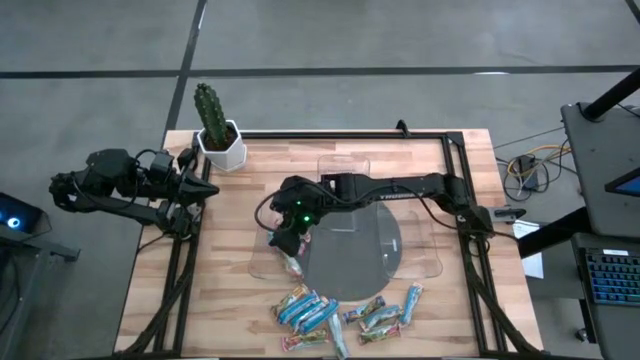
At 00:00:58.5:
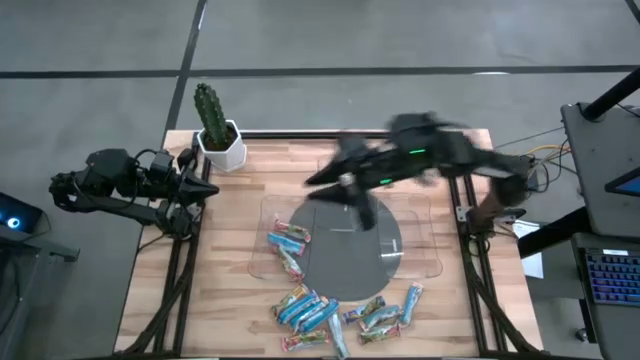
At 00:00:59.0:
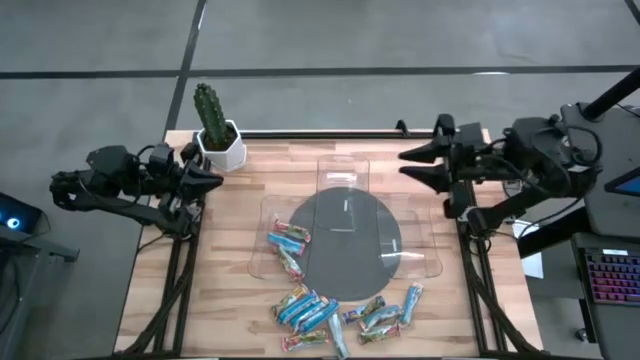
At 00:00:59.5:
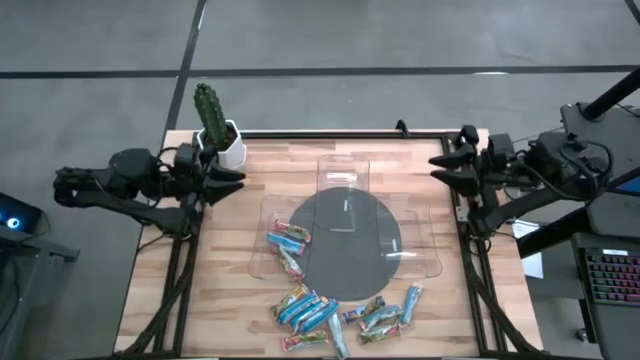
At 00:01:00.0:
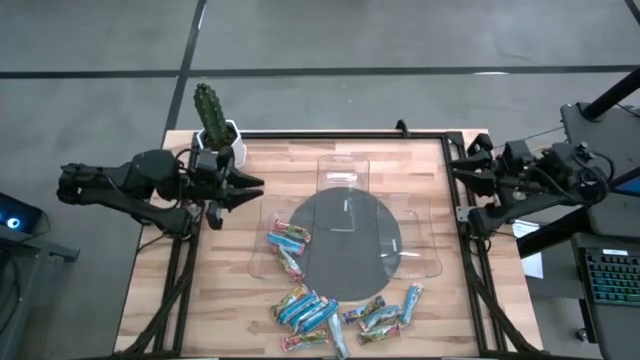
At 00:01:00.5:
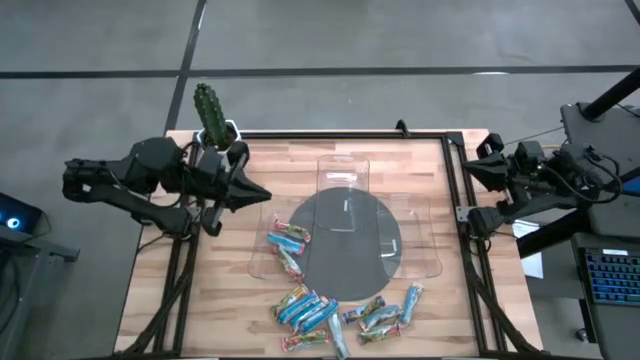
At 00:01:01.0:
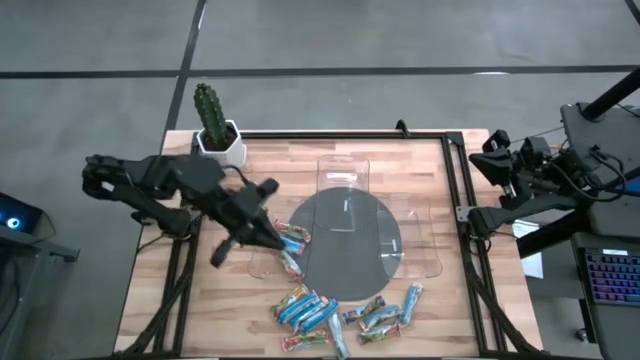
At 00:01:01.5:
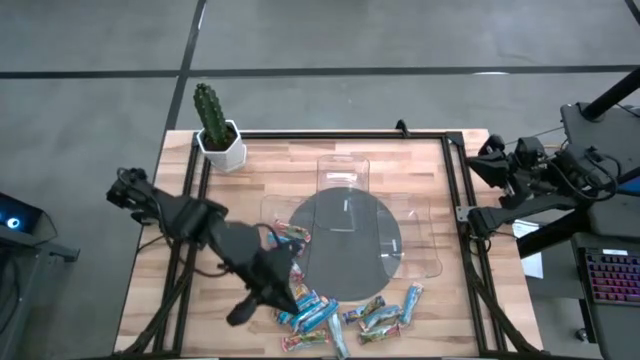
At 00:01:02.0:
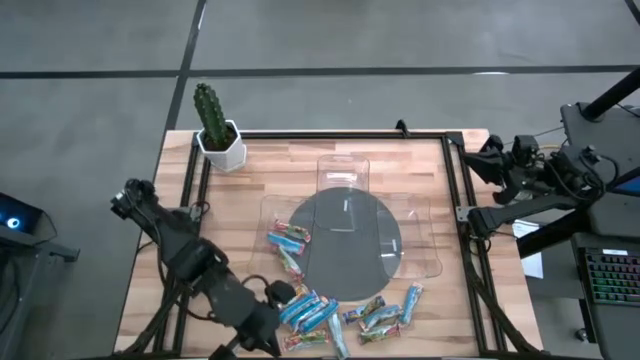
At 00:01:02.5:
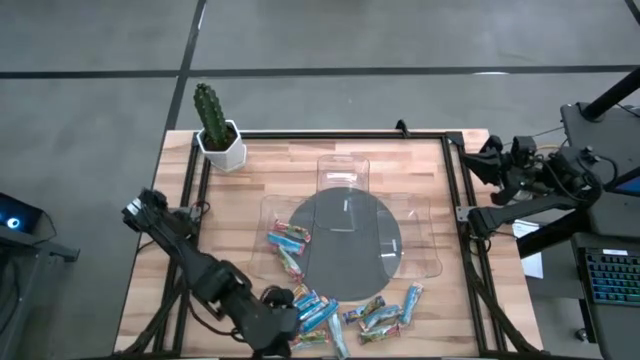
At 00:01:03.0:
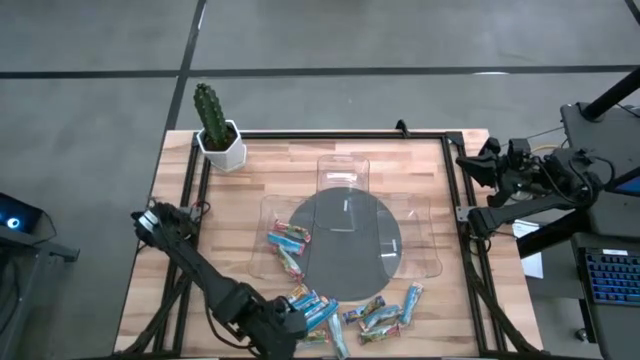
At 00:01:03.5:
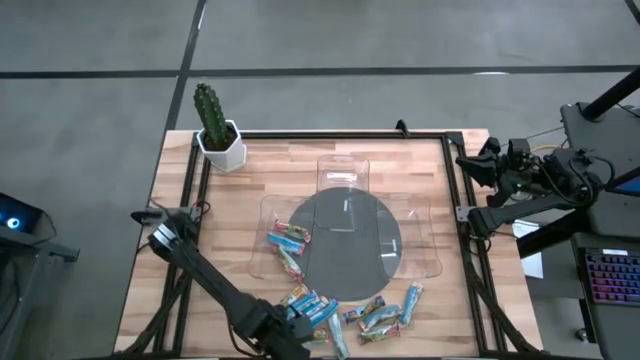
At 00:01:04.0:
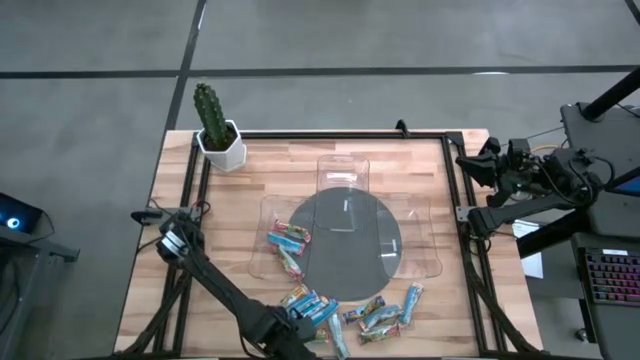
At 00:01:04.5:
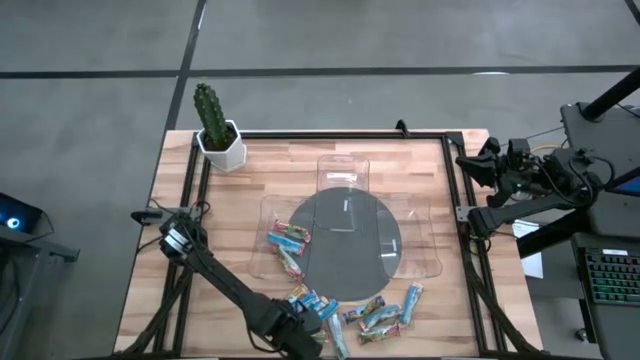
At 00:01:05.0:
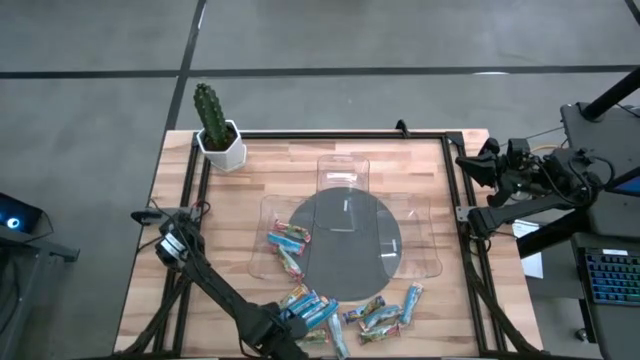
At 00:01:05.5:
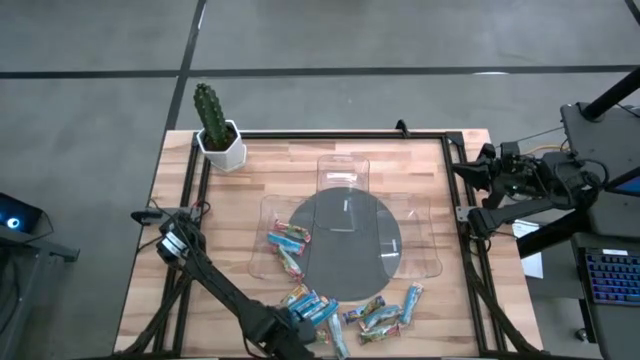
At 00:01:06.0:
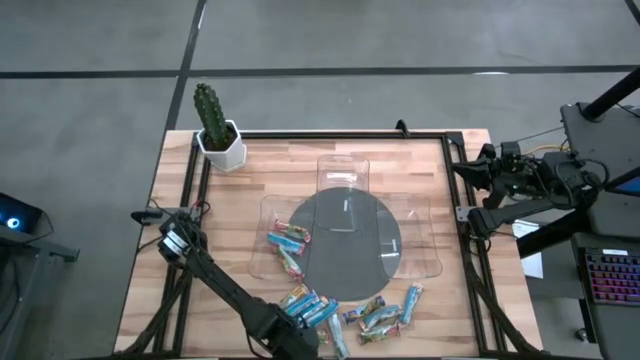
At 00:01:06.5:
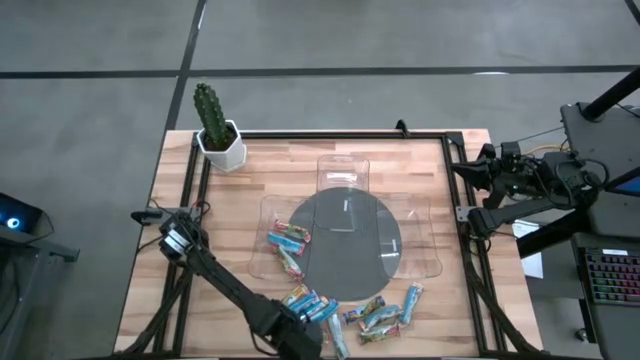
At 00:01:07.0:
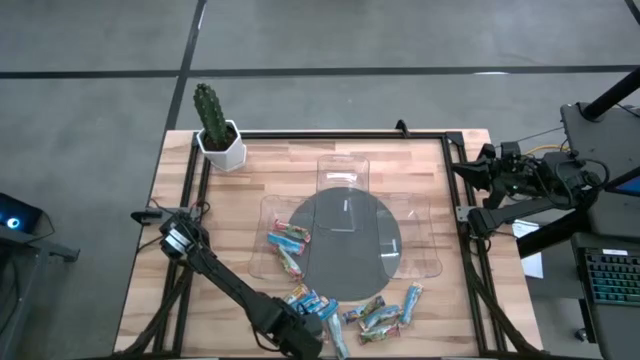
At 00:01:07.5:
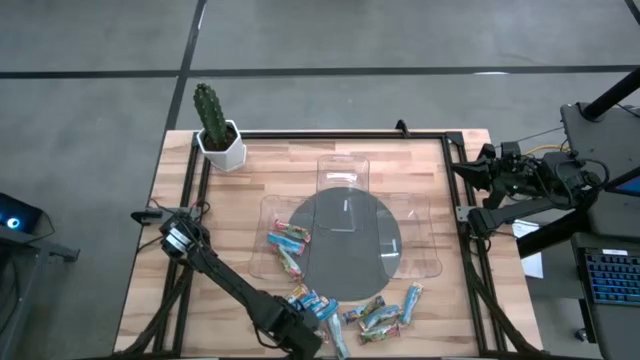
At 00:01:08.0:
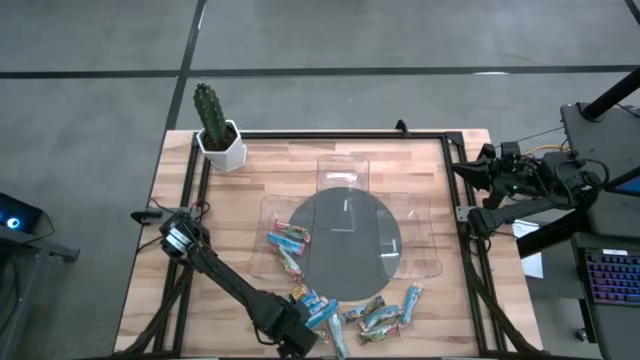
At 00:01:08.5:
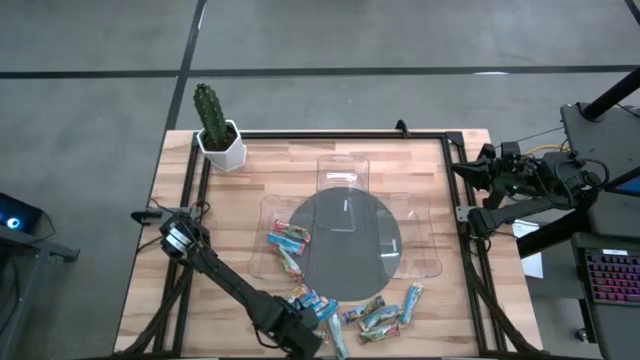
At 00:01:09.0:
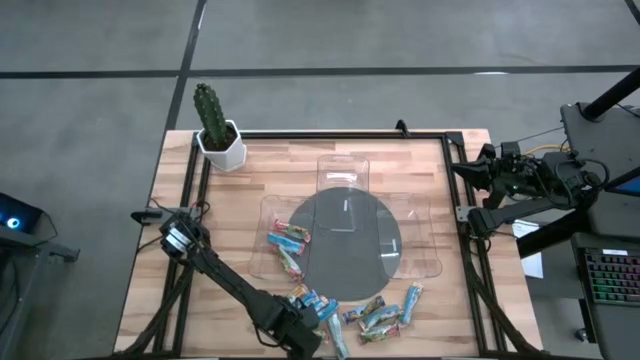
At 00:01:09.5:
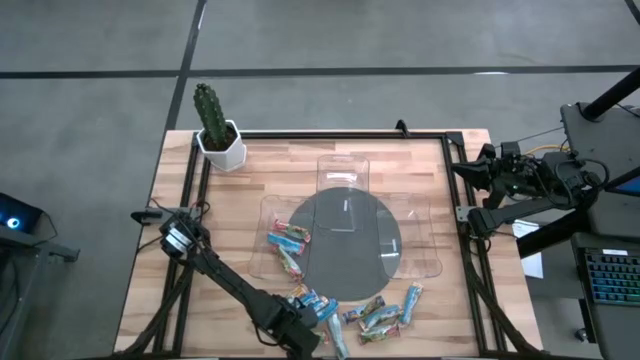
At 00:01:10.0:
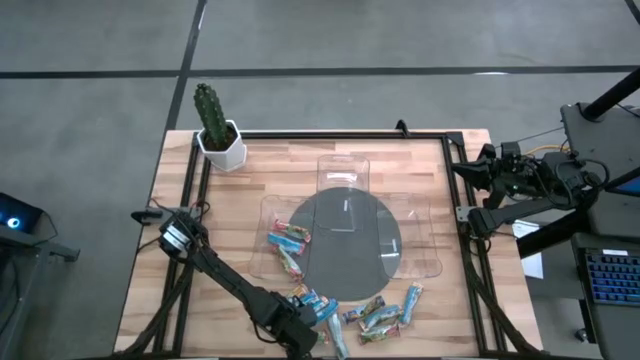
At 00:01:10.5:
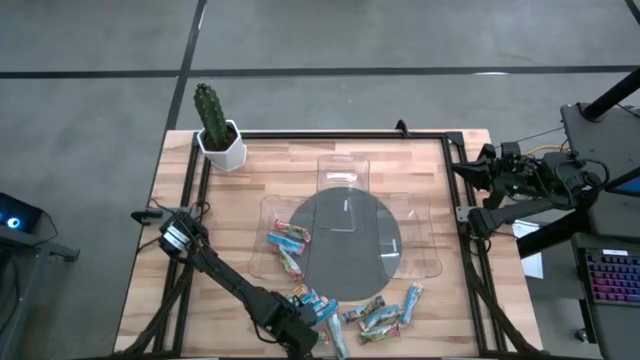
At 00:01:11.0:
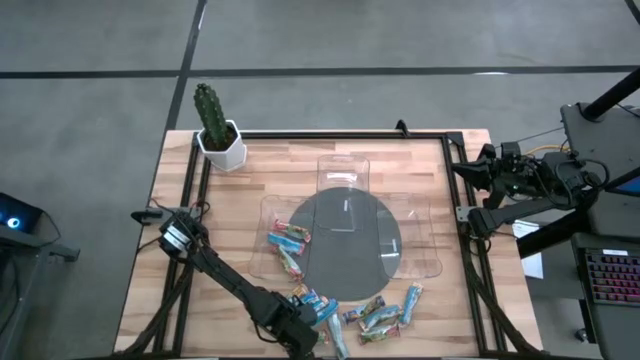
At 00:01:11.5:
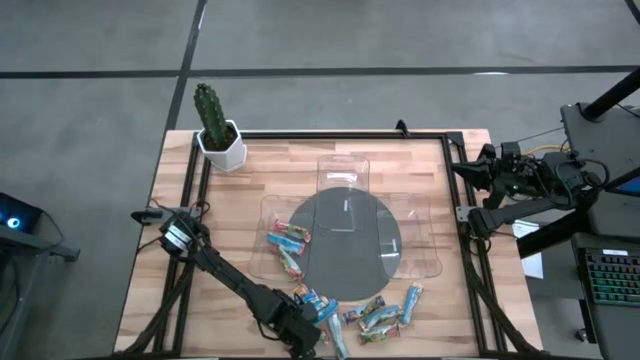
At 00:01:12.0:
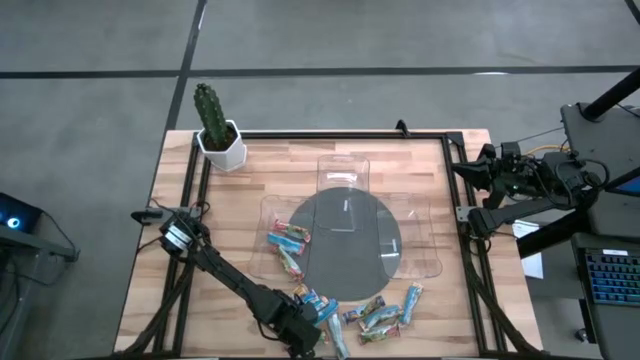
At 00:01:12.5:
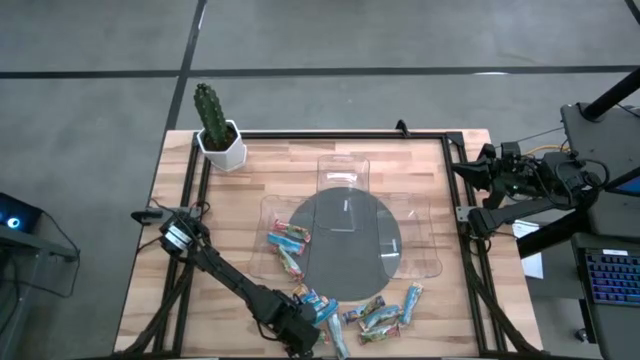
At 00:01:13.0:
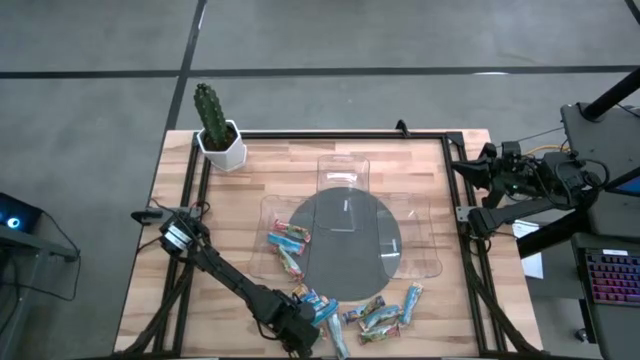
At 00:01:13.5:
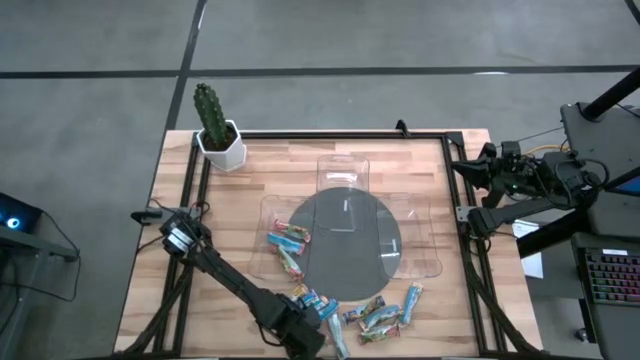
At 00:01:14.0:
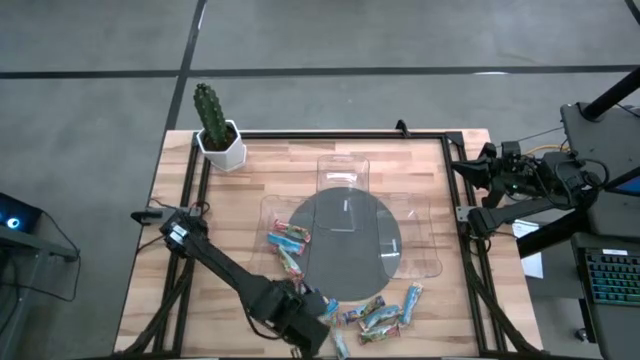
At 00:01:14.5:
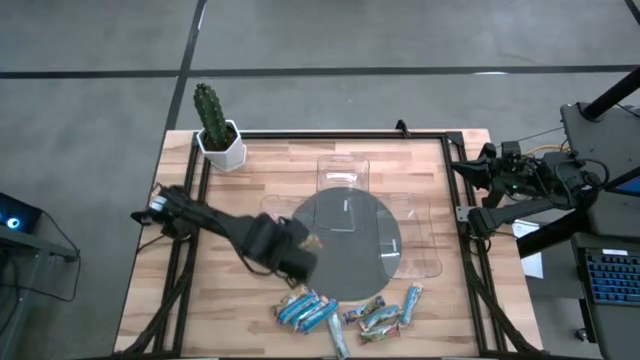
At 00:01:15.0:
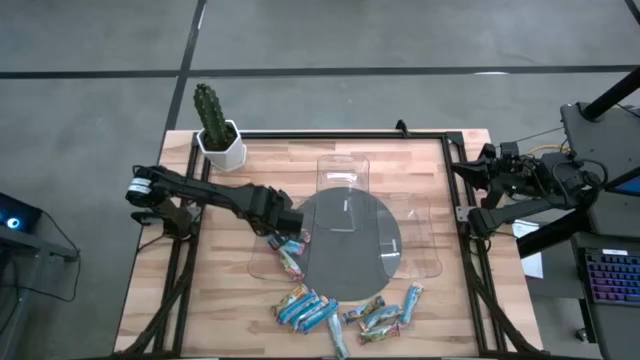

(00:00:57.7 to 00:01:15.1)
Task: Pick and place Granola Bars by type
Put the red granola bar into the left transparent bin
